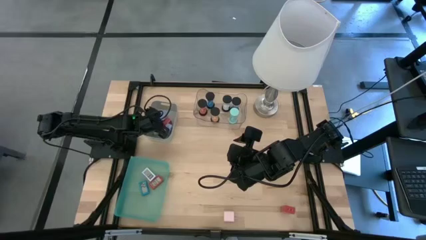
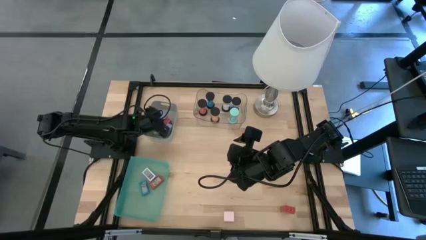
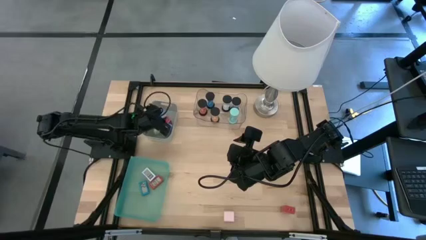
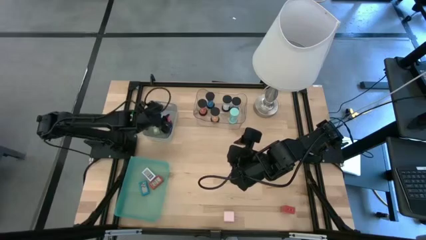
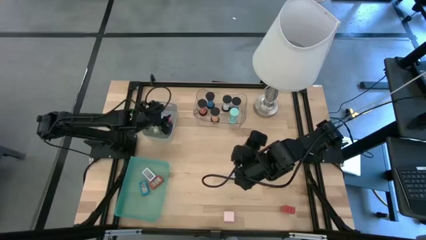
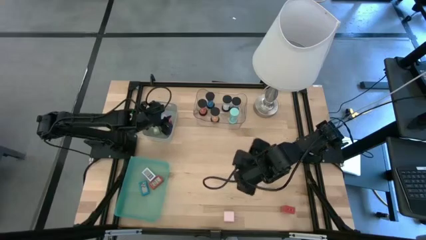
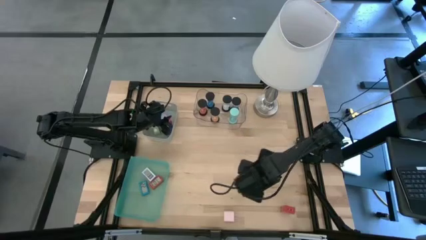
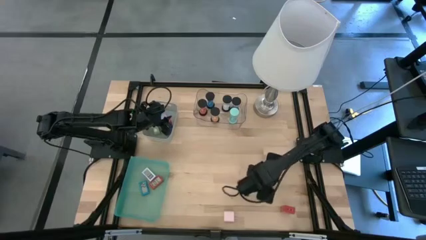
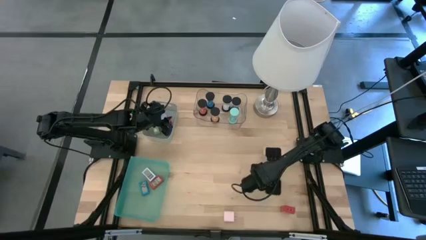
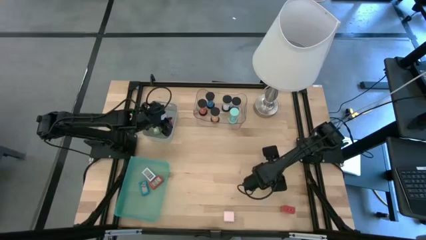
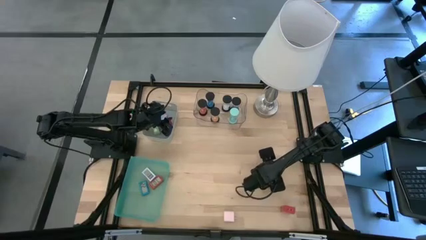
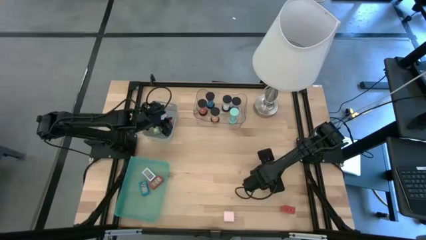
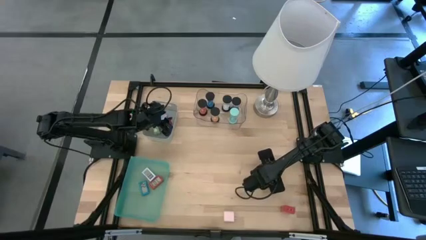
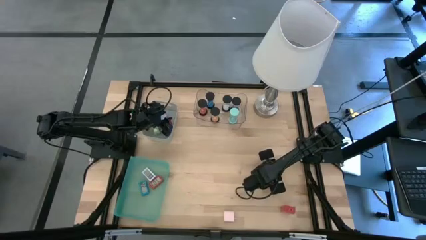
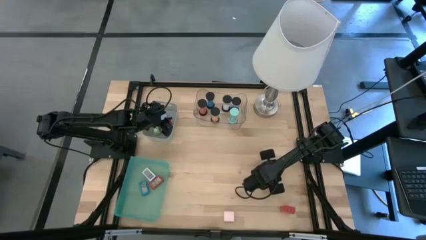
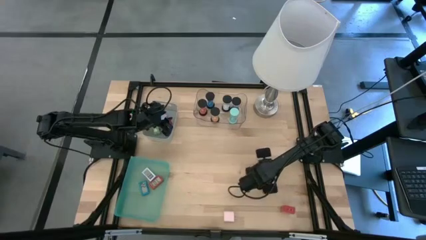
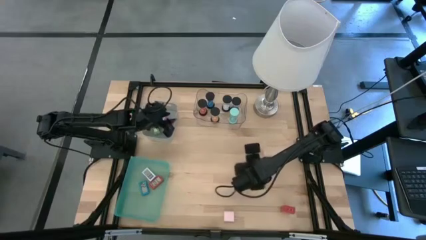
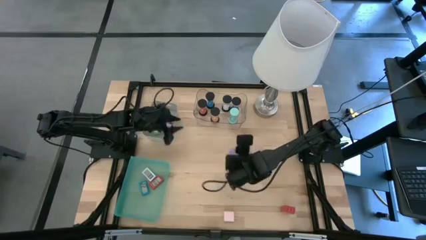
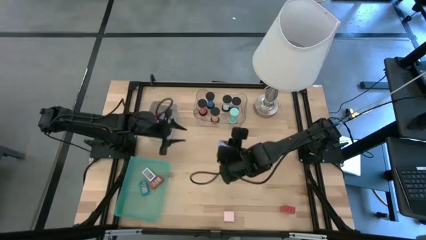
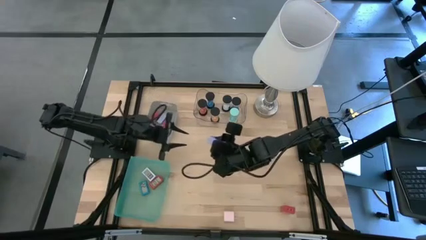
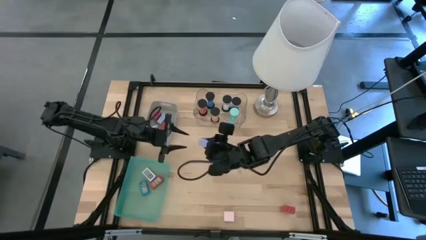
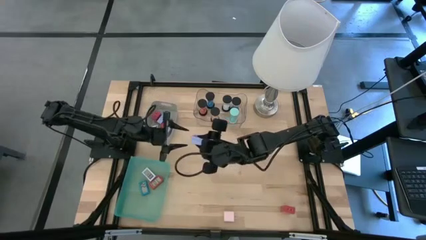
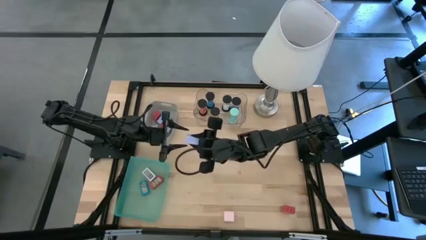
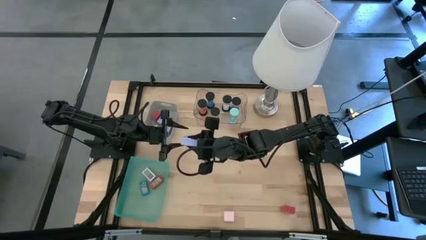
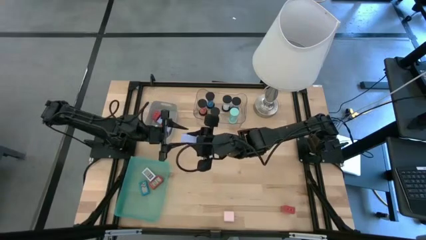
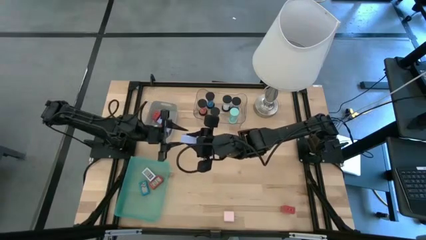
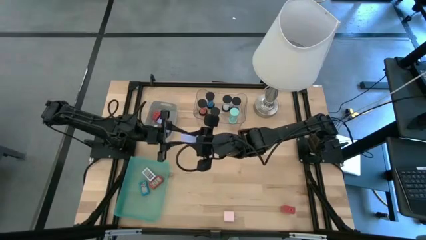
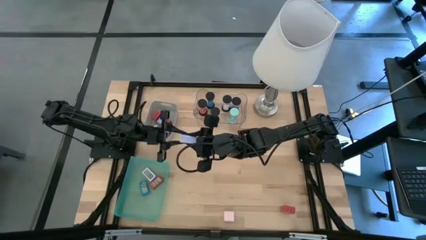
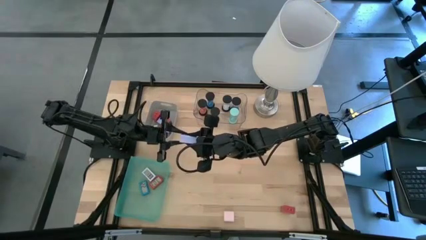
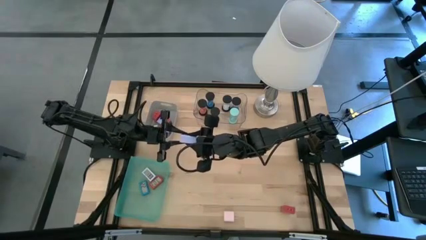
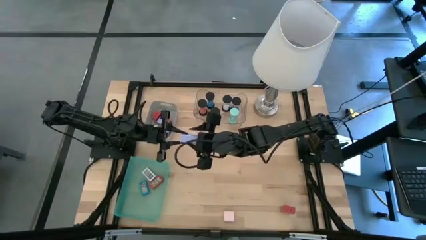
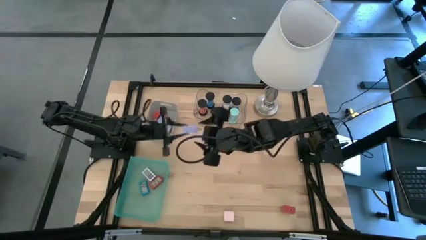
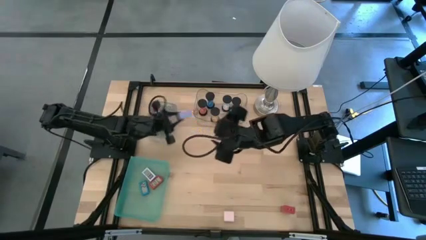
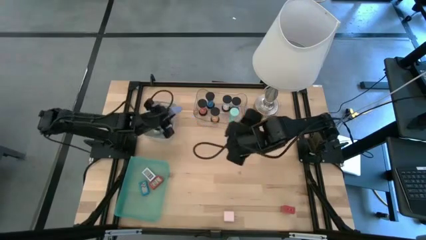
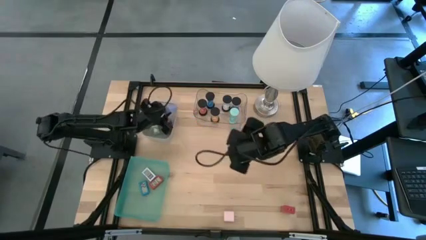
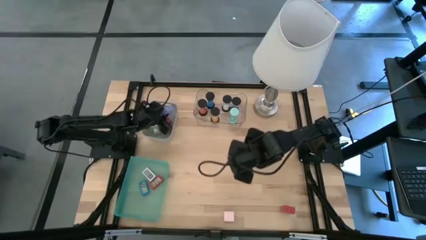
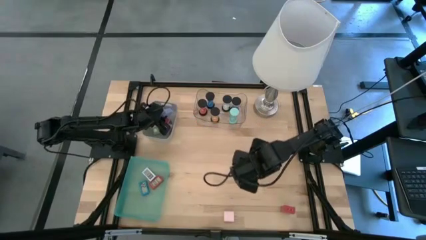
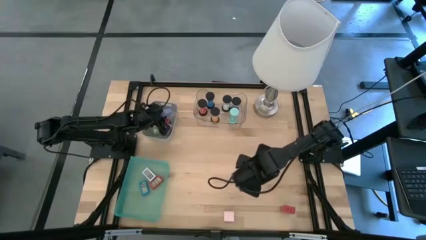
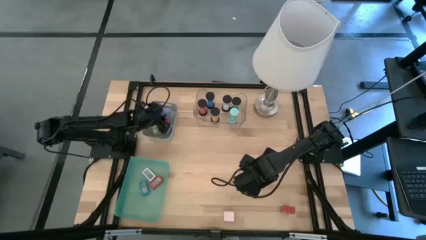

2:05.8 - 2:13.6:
Task: Pick & Place Office items
Put the light purple charger adapter into the gray bin

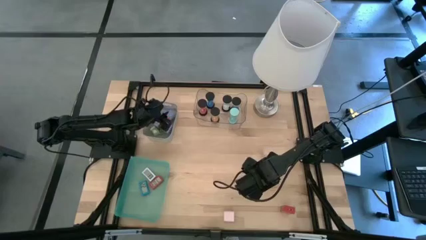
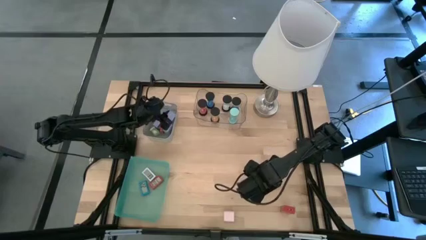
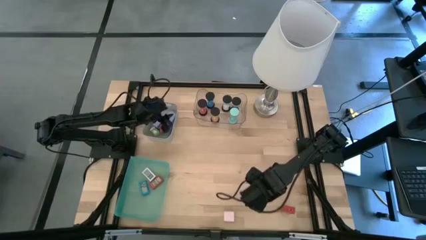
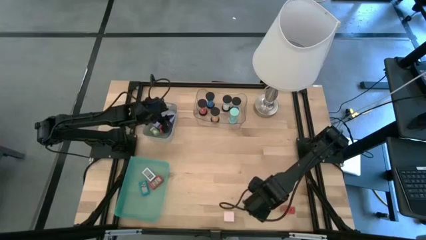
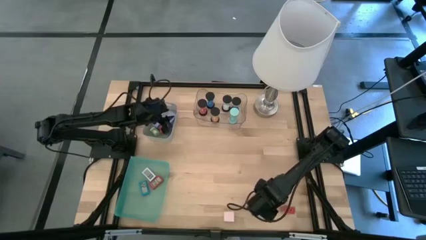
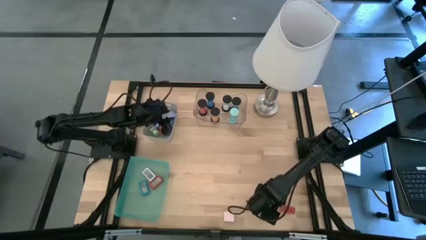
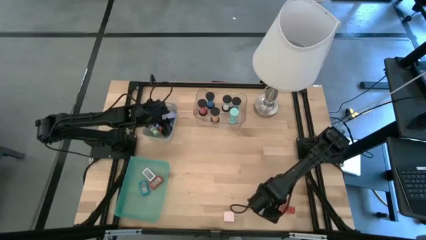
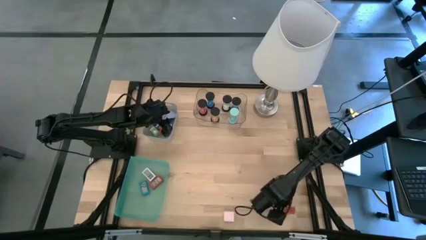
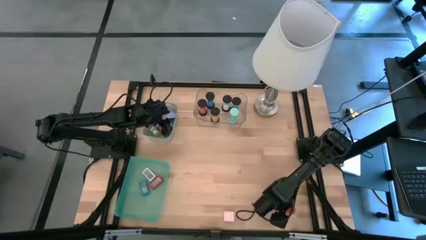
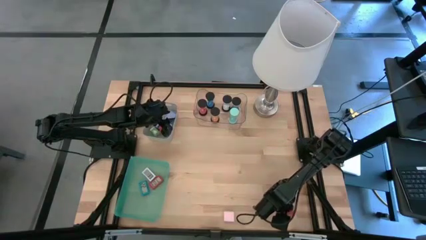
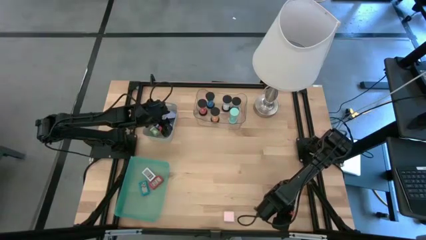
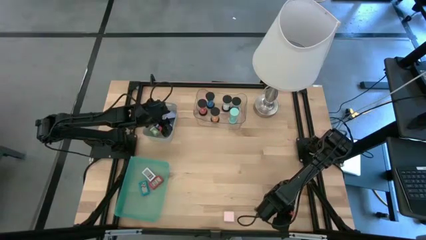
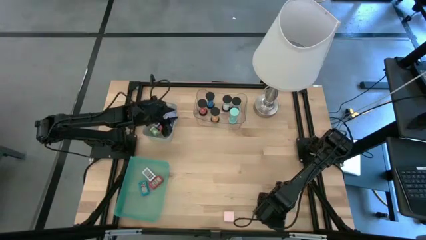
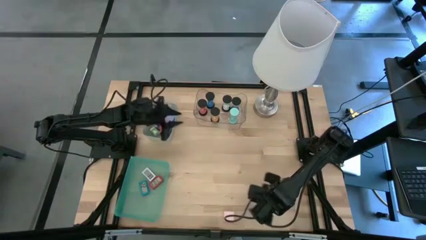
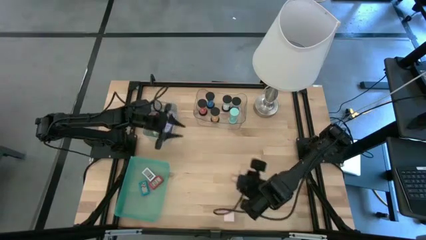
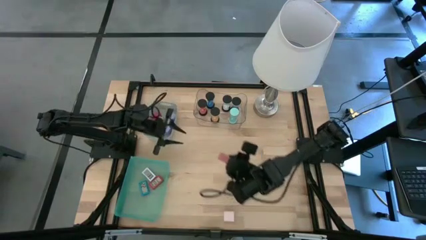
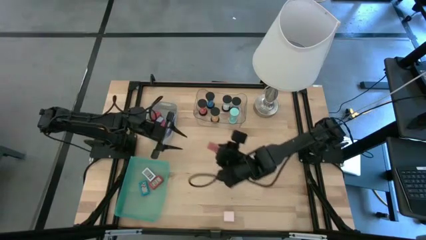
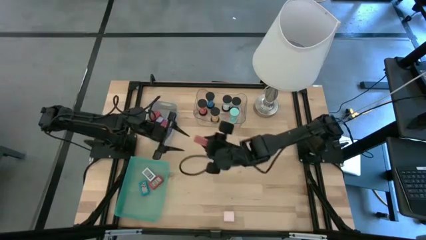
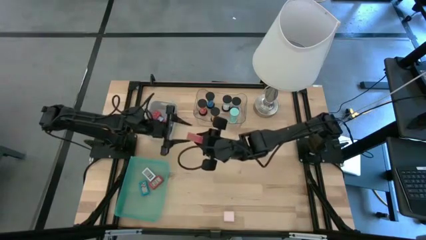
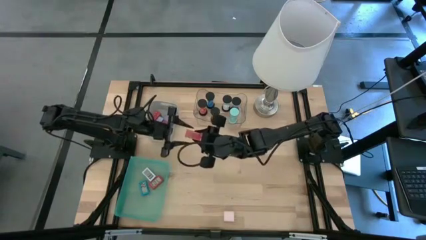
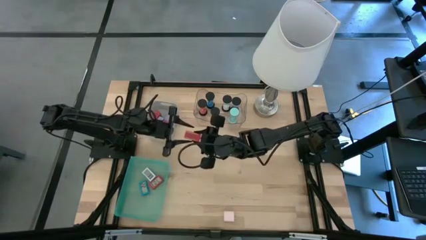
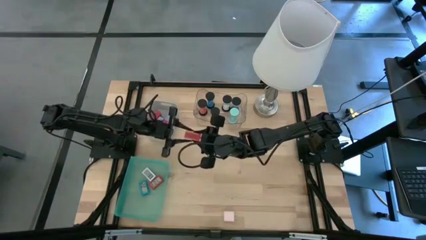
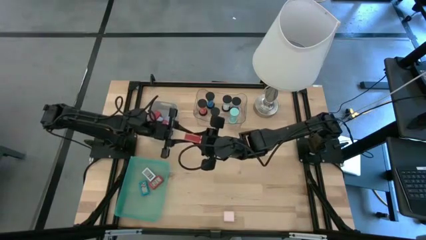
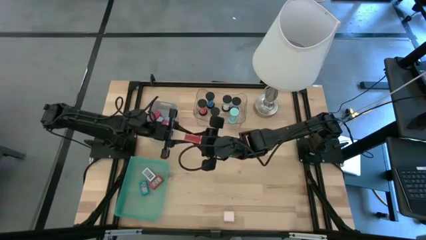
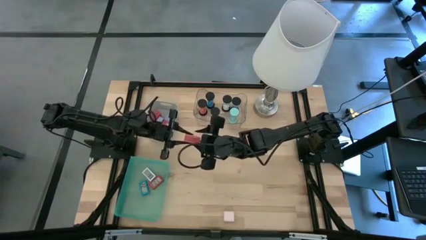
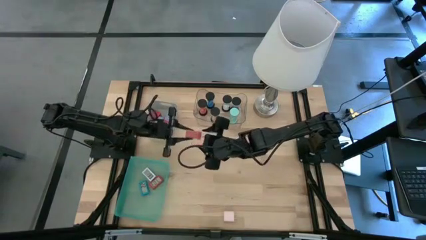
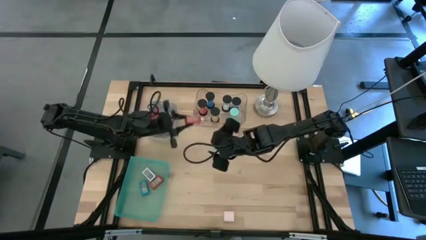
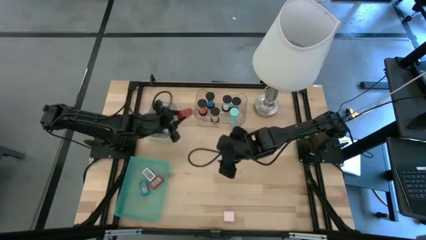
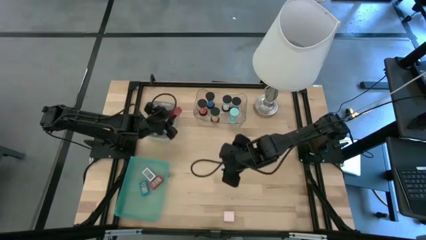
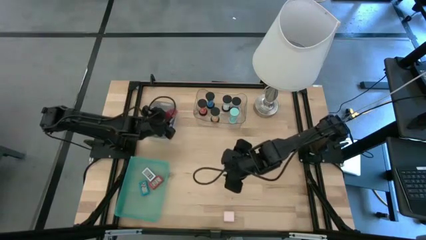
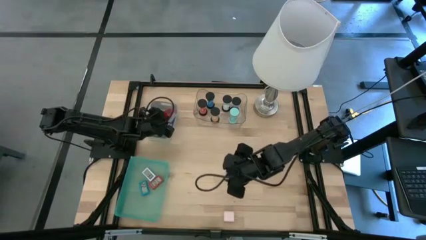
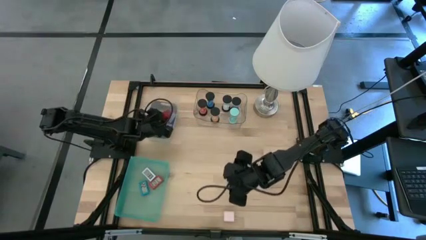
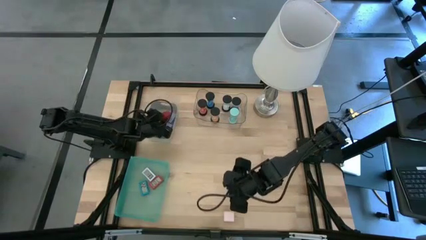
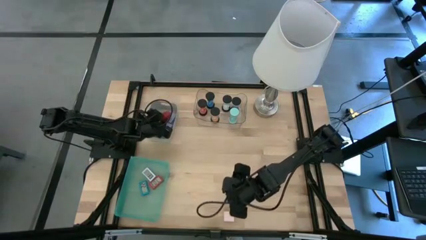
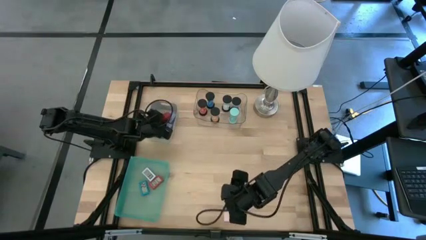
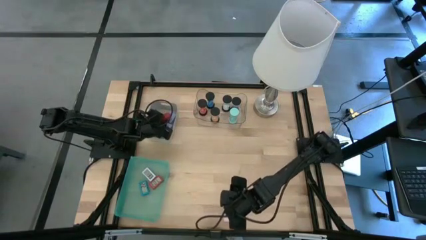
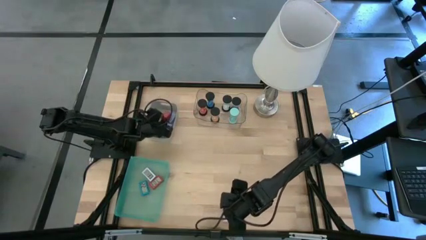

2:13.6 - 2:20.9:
Put the red charger adapter into the gray bin

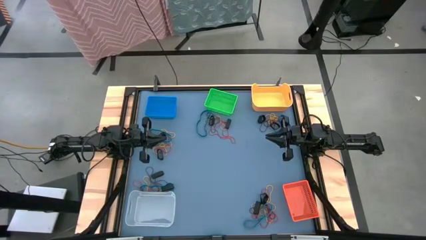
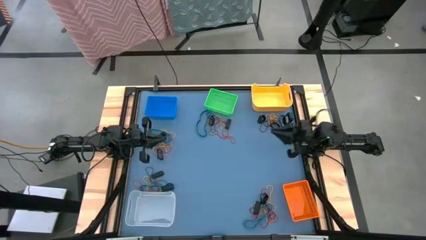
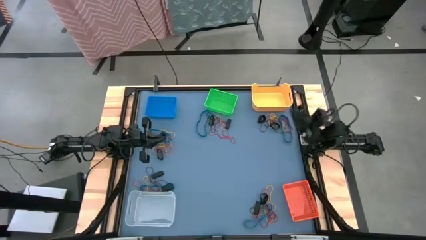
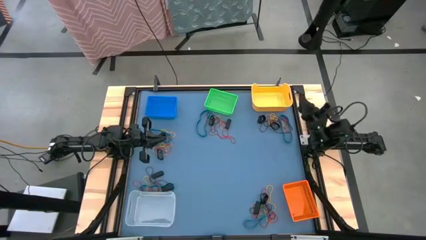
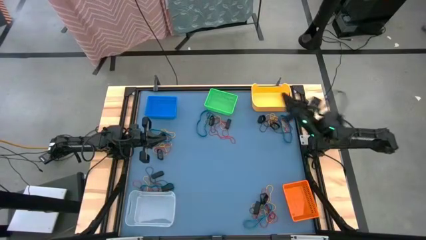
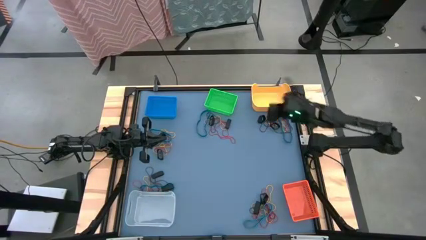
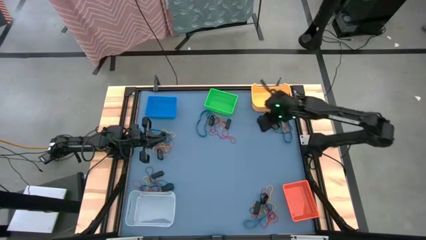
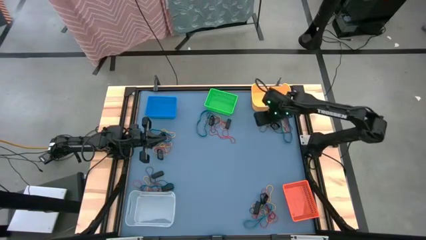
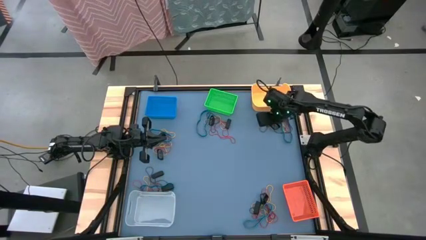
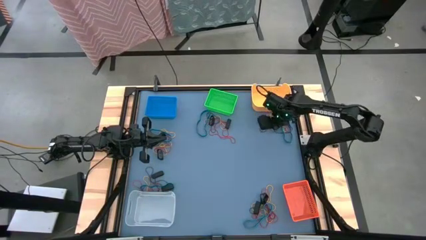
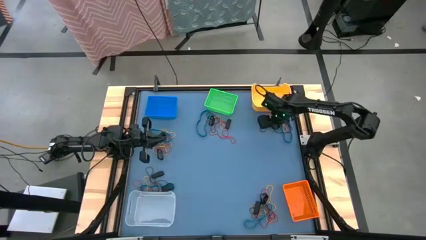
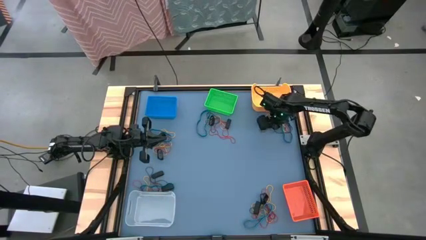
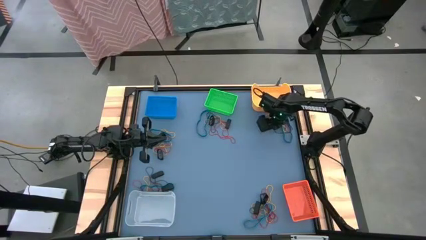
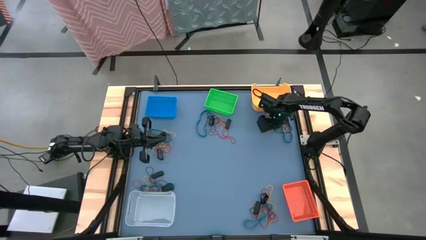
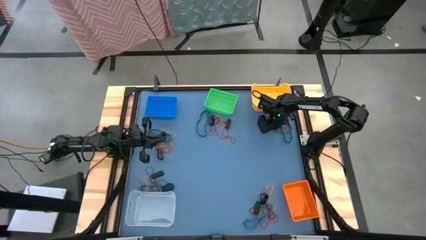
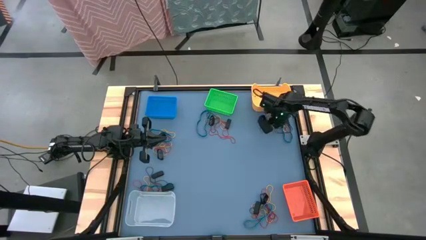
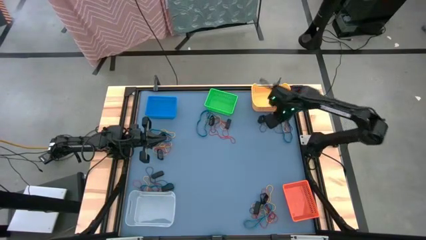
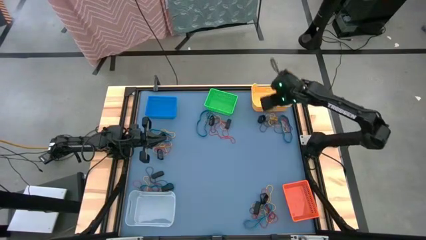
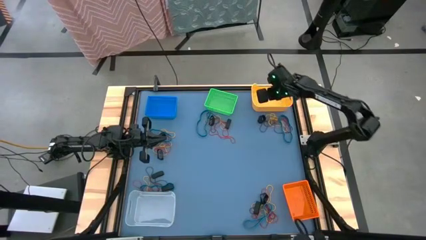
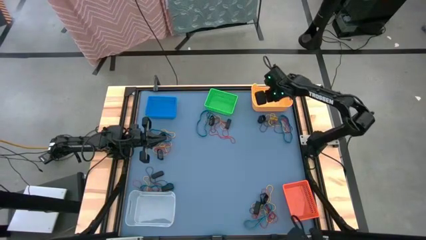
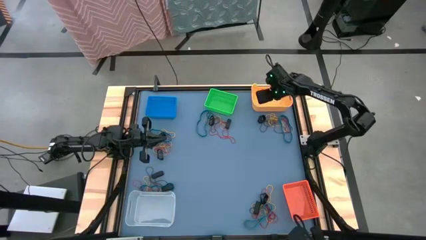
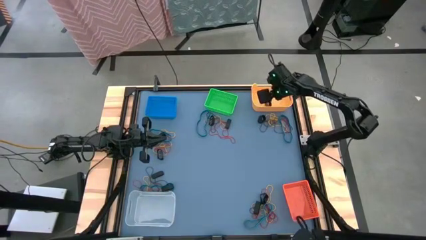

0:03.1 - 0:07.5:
Task: Sort rubber bands into baskets
Put the black rubber band into the yellow bin
